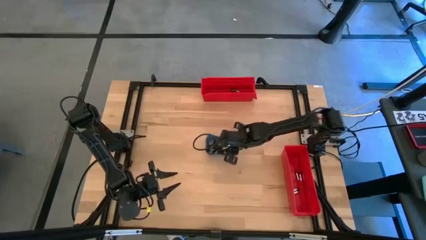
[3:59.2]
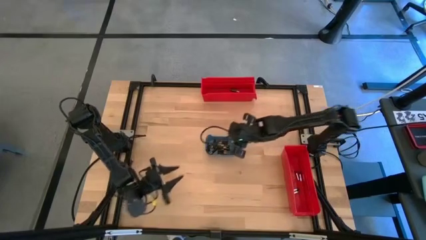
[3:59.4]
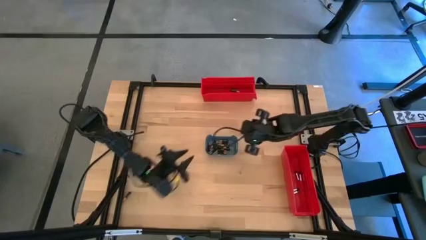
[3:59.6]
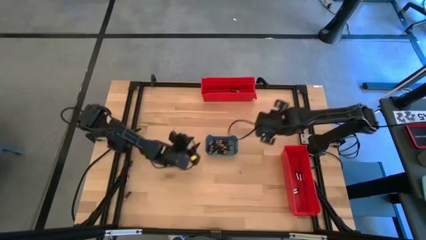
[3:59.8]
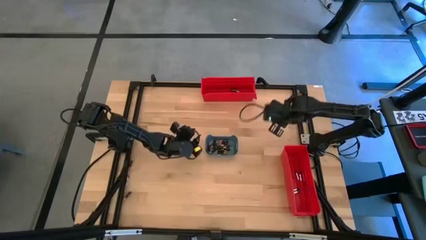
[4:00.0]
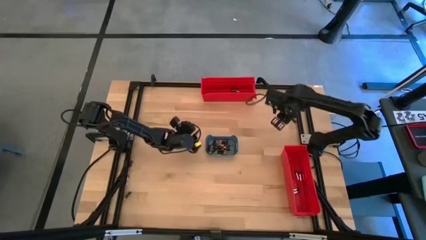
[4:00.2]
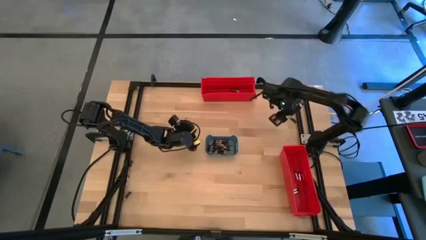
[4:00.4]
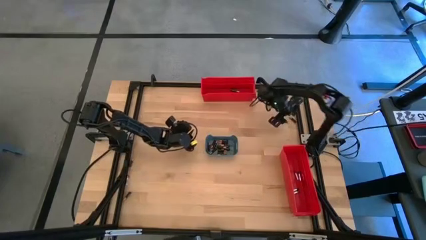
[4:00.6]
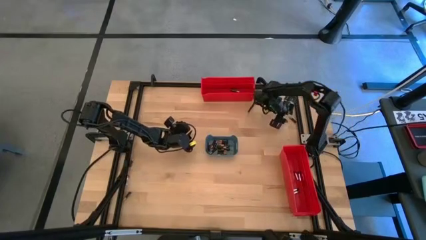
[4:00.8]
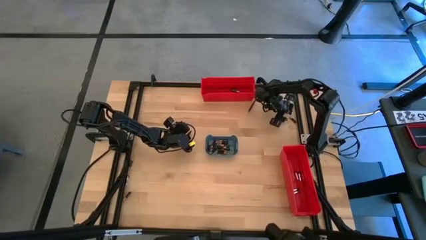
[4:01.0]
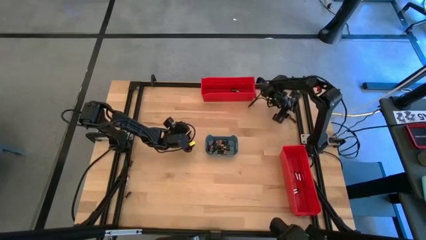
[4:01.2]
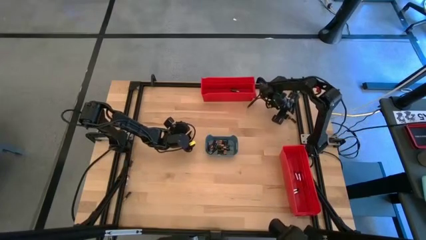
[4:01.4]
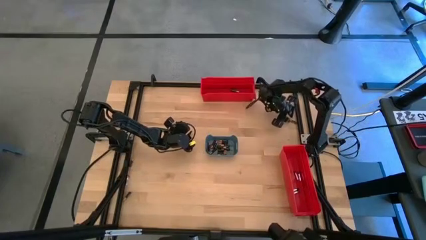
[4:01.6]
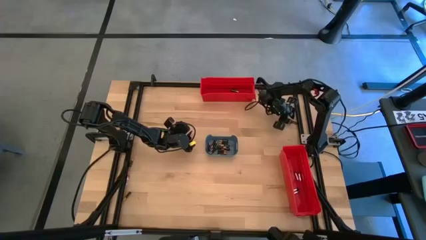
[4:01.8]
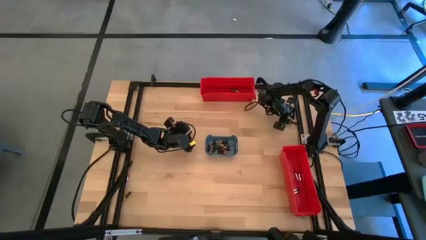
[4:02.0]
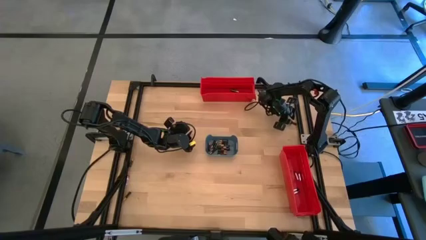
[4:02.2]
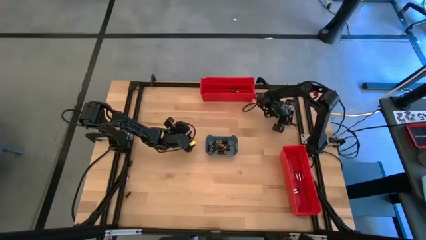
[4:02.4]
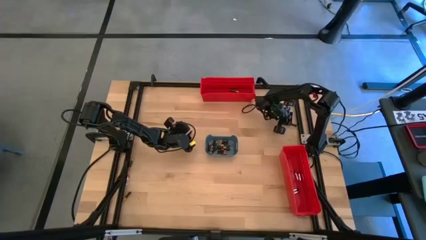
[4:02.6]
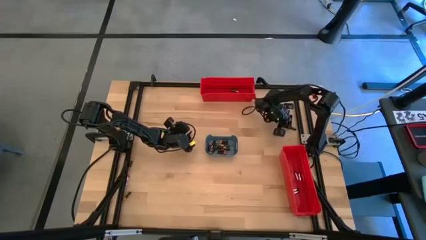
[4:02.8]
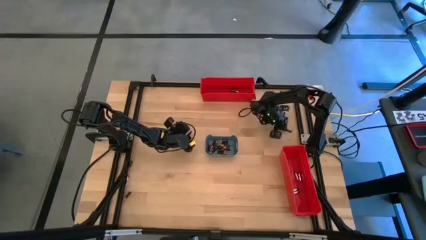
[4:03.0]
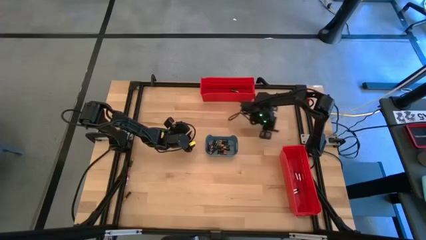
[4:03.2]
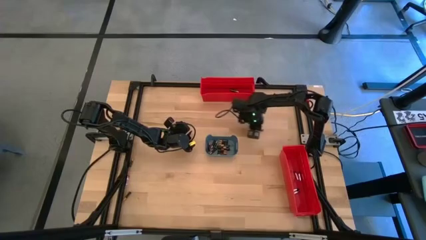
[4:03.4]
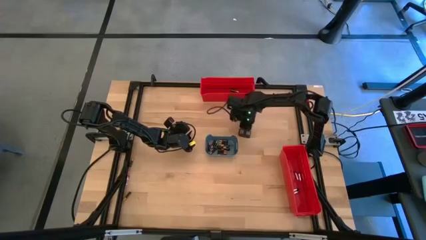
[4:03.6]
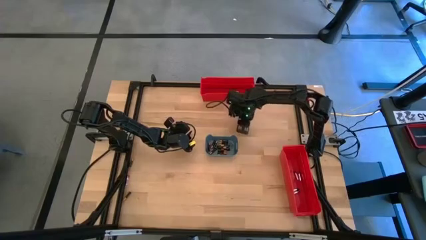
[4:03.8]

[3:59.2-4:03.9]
Task: Sort batteries
Put the black battery into the blue bin

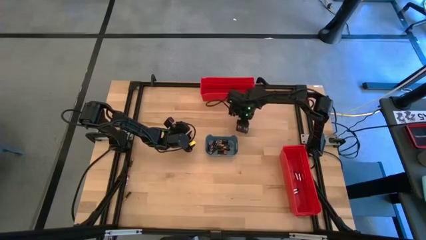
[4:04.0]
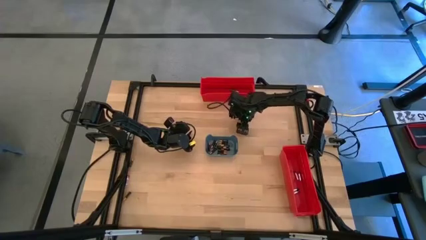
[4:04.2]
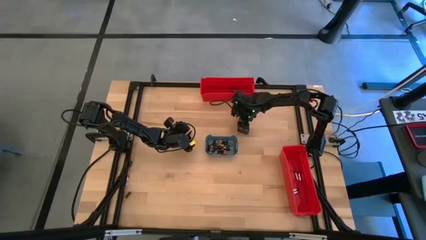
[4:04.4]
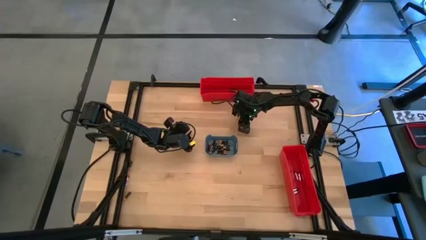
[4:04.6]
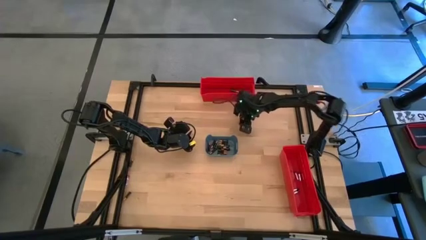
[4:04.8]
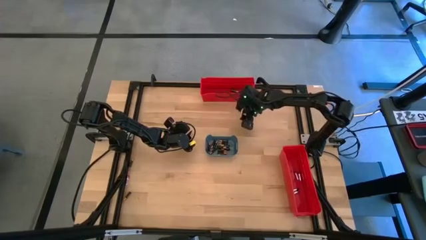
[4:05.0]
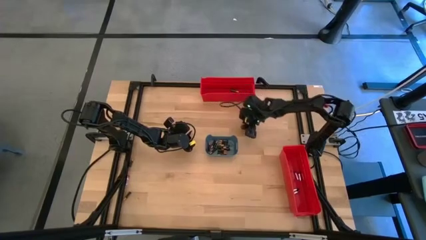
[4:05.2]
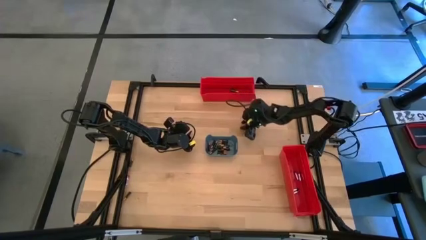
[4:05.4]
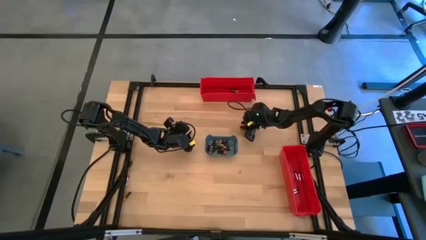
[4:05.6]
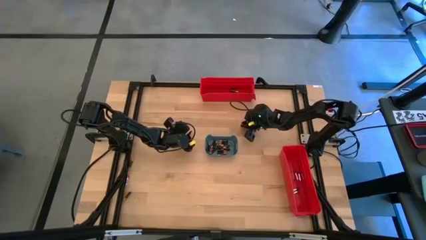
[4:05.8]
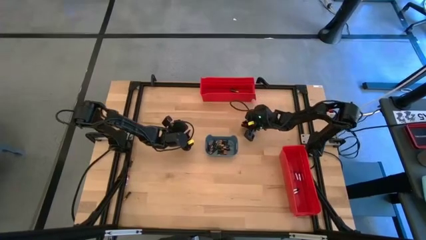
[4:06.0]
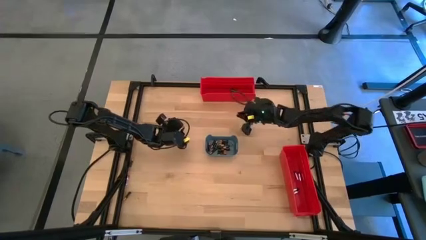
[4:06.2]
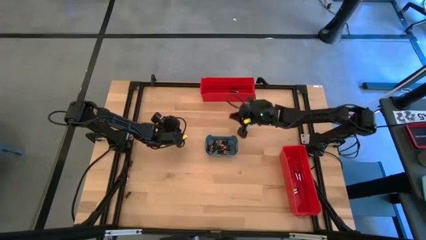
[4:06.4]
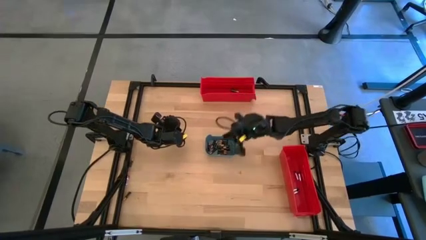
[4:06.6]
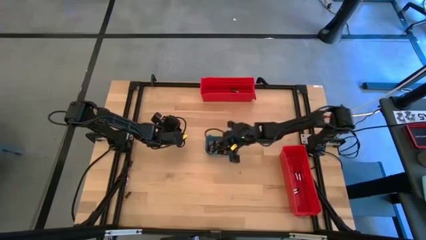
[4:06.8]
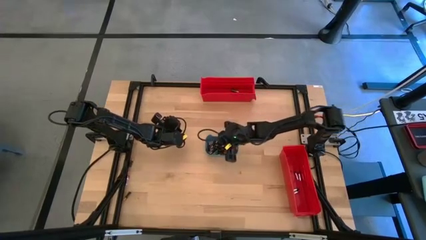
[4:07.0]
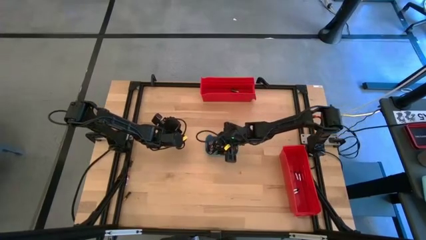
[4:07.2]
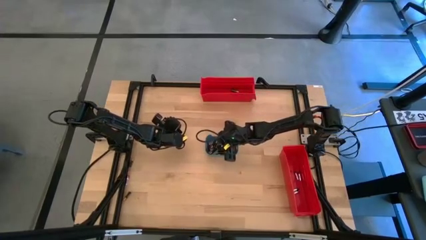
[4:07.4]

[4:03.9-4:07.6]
Put the black battery into the blue bin

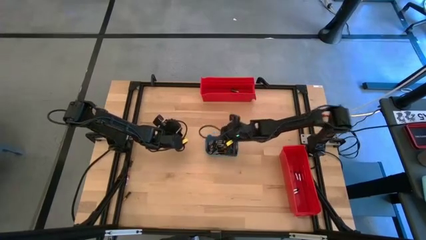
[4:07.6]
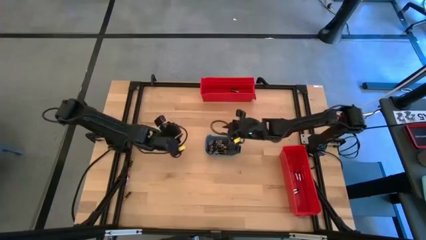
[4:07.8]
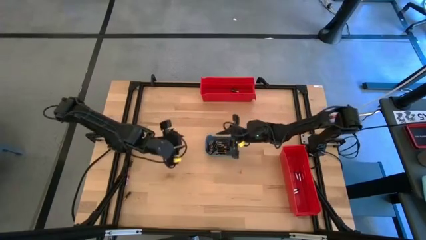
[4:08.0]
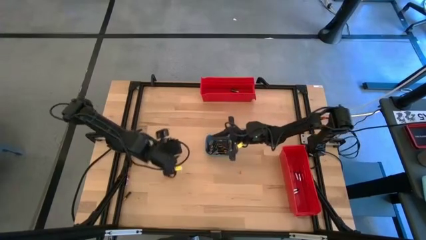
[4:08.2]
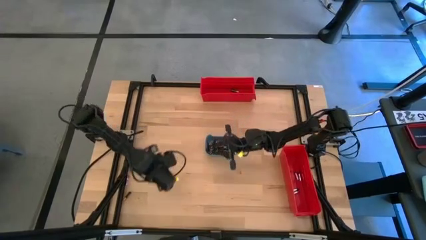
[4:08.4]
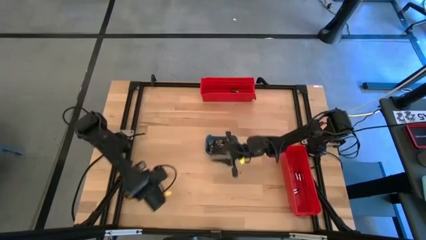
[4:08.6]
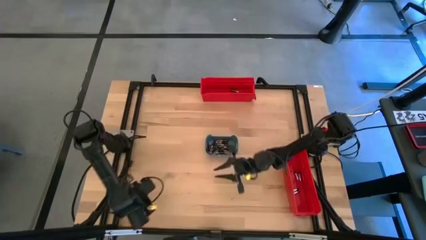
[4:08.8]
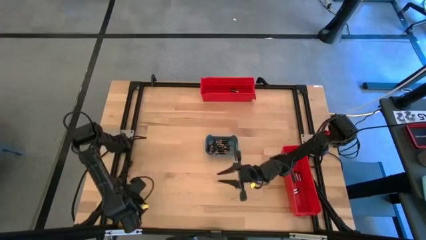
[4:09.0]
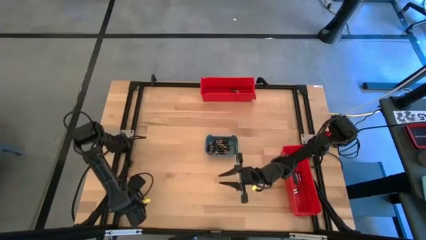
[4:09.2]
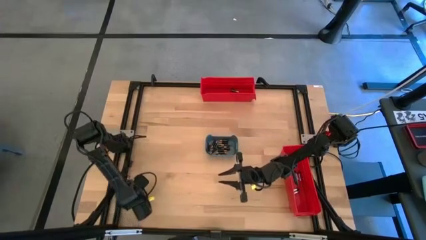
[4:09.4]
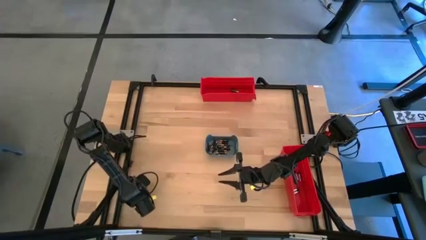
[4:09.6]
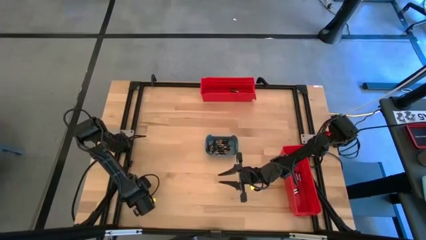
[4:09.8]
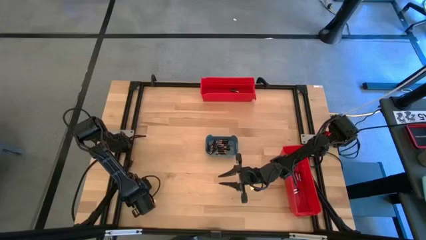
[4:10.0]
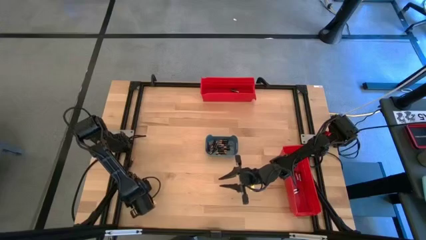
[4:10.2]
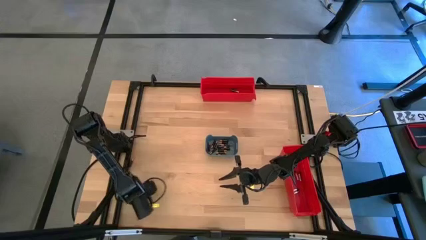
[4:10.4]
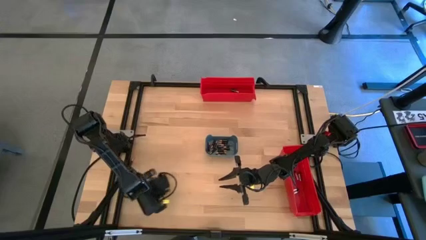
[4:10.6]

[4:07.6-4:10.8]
Put the black battery into the blue bin

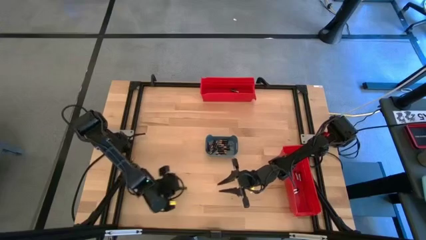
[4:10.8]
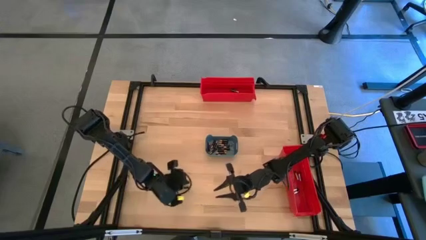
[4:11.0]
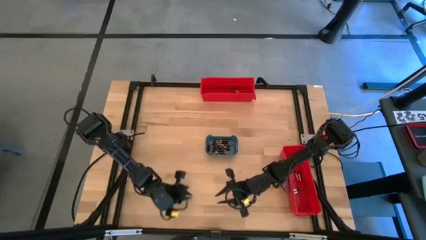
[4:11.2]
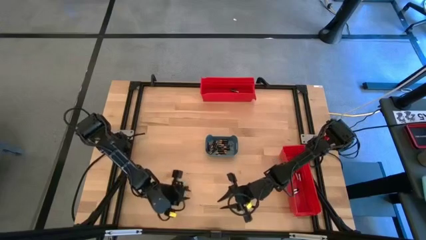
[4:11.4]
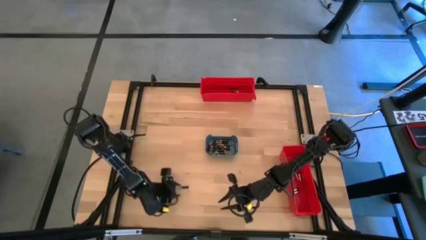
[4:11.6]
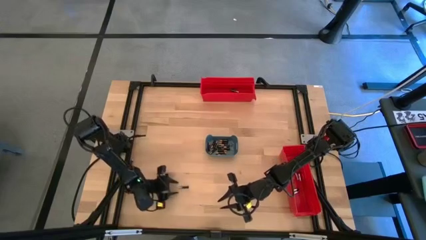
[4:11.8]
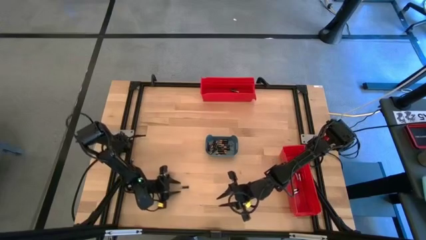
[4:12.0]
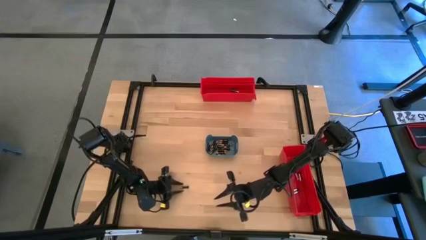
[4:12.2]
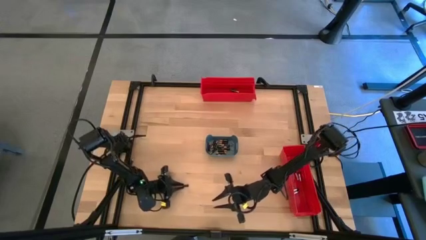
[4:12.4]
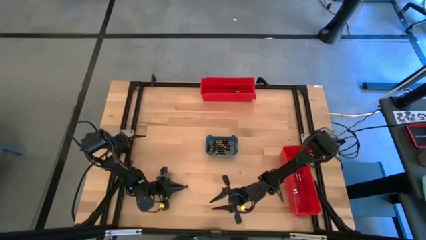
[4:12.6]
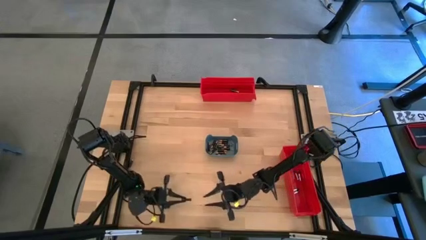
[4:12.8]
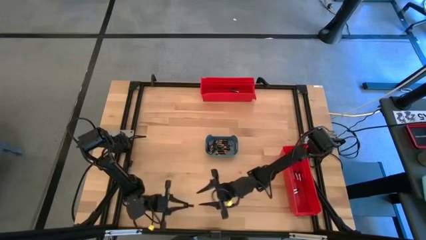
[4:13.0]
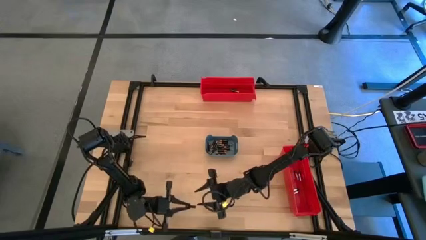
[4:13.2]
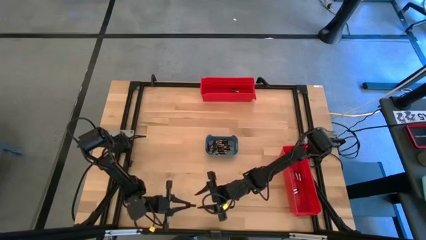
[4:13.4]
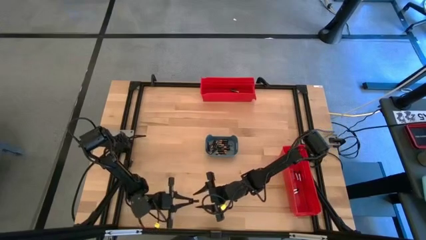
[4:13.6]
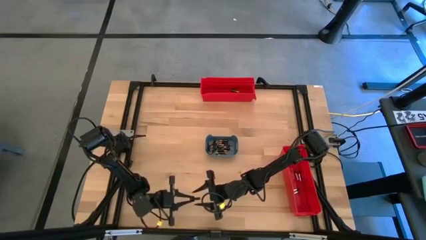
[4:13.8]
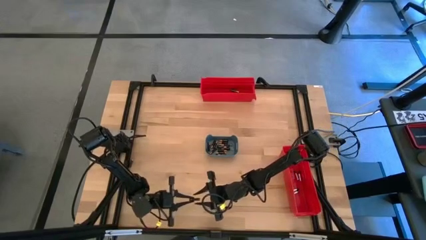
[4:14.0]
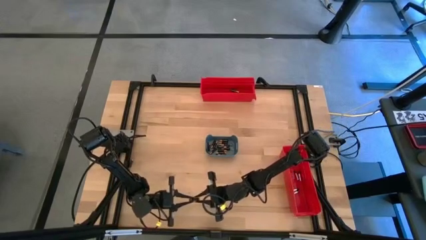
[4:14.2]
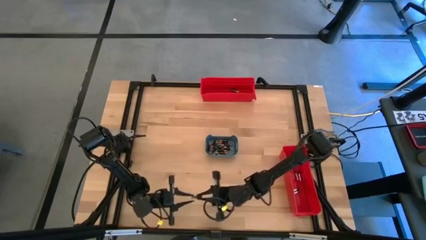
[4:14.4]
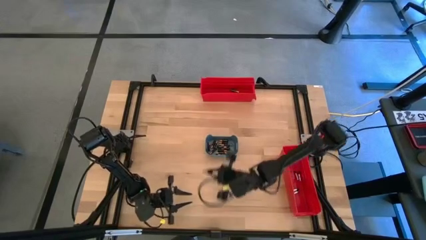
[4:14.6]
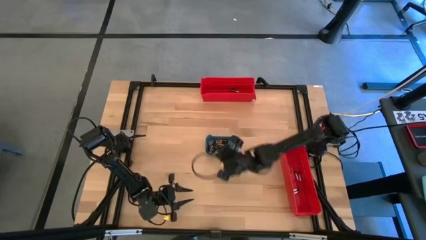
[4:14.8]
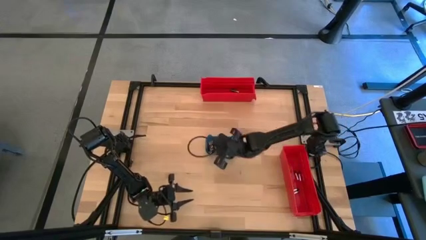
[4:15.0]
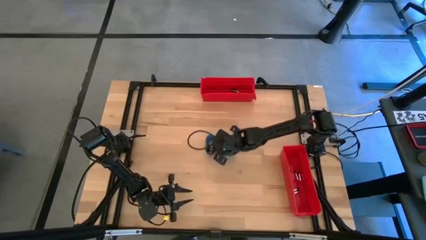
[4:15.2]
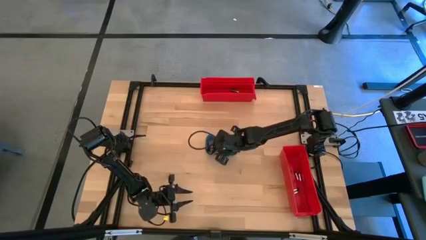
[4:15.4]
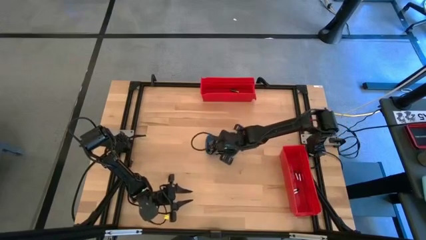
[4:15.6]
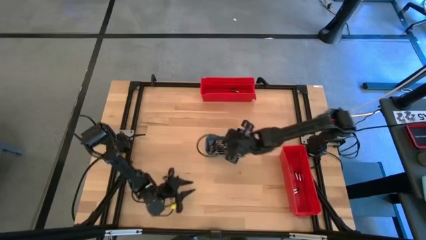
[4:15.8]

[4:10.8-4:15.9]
Put the black battery into the blue bin
